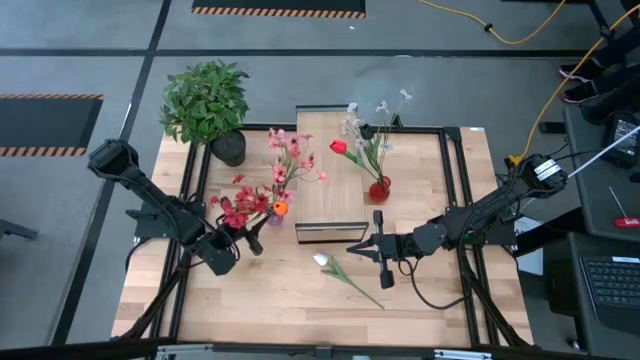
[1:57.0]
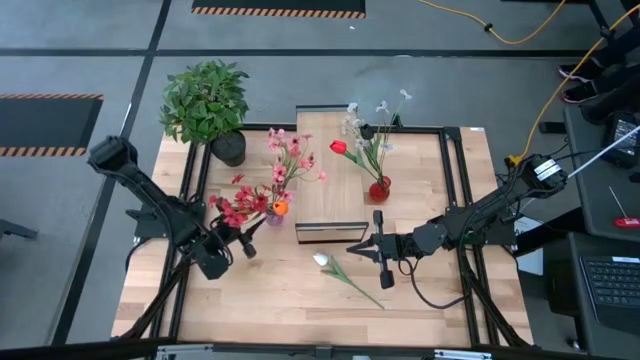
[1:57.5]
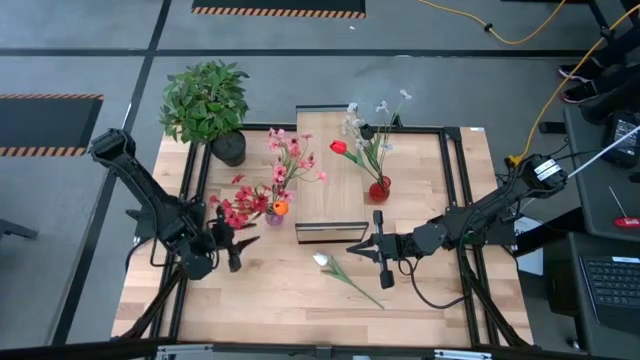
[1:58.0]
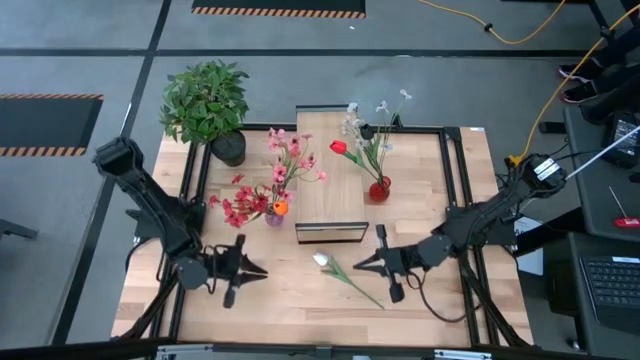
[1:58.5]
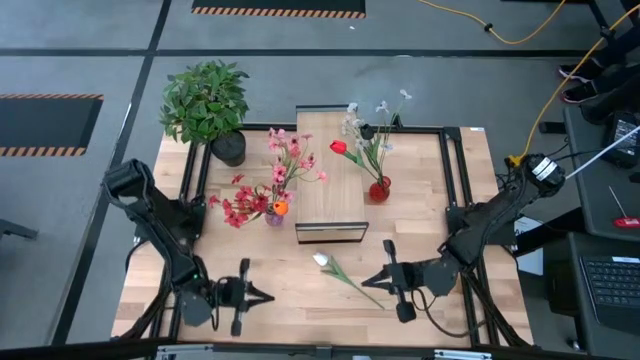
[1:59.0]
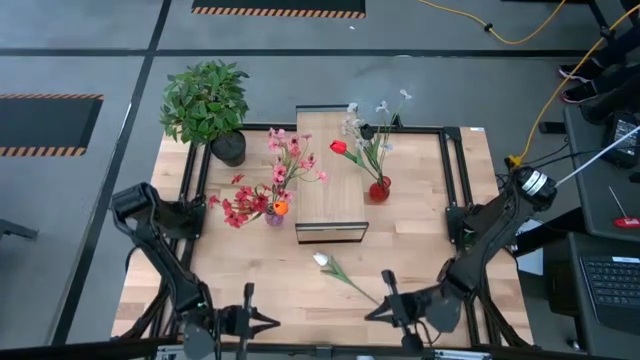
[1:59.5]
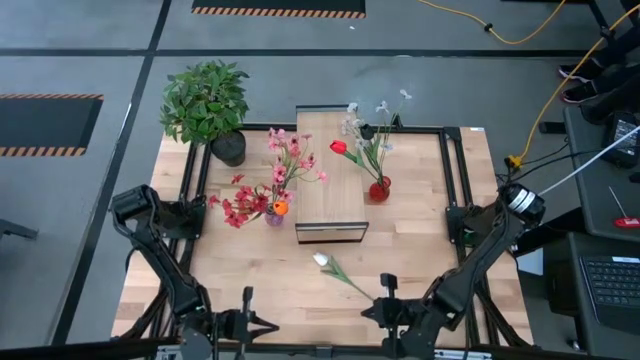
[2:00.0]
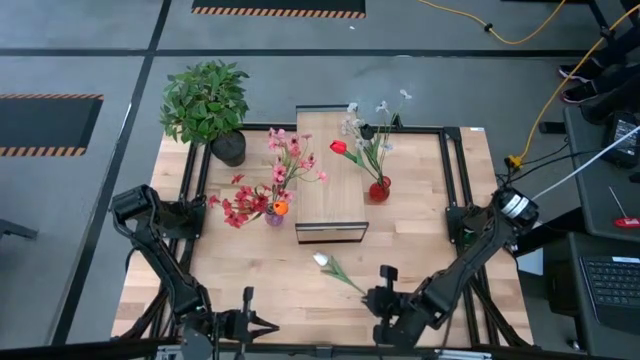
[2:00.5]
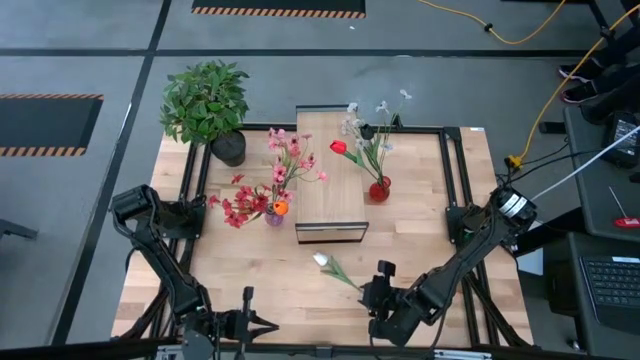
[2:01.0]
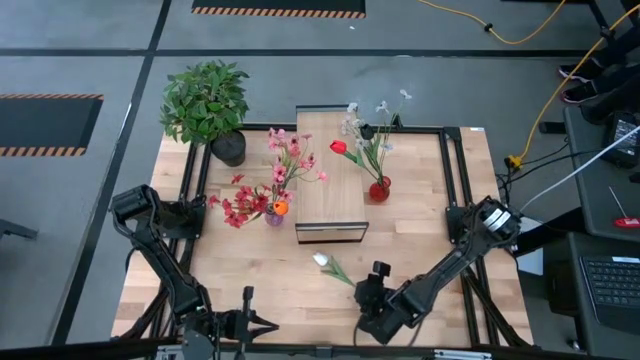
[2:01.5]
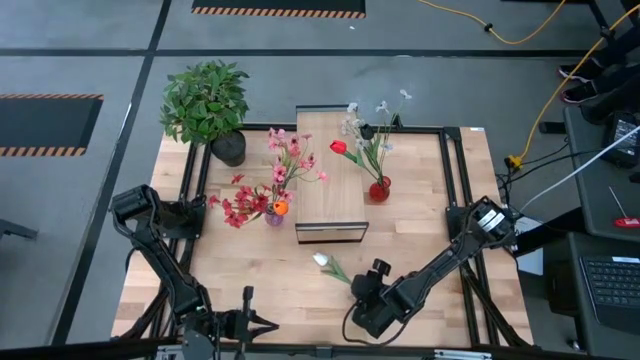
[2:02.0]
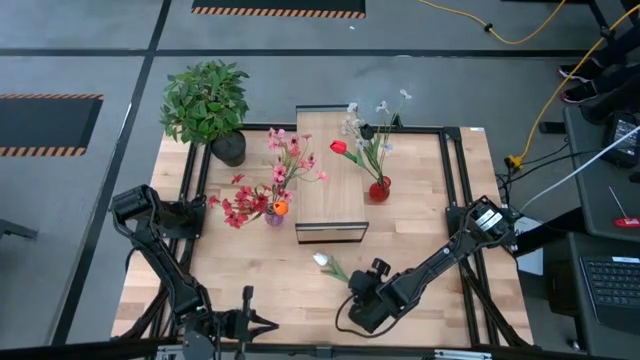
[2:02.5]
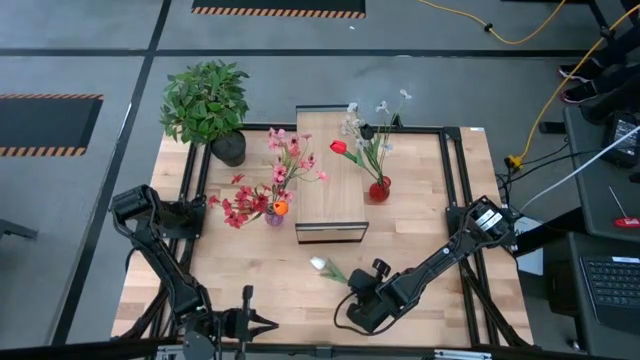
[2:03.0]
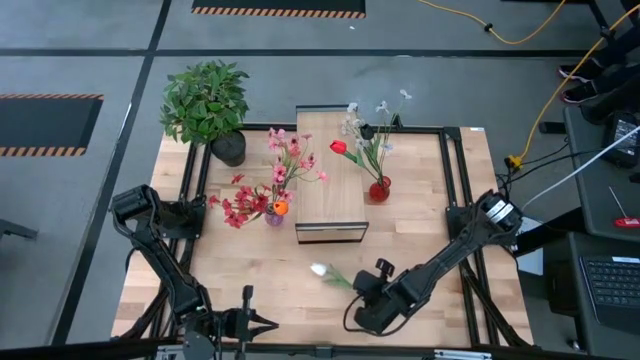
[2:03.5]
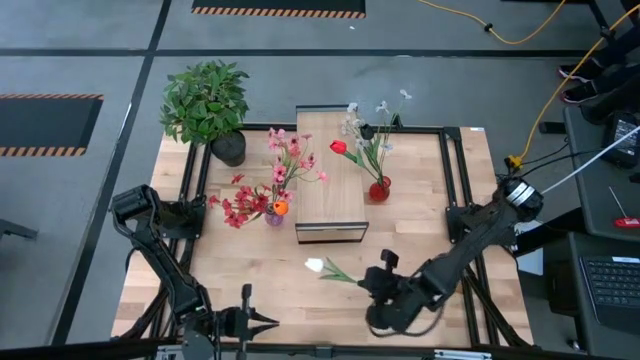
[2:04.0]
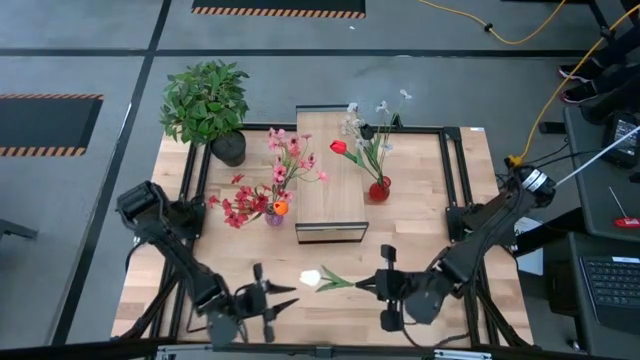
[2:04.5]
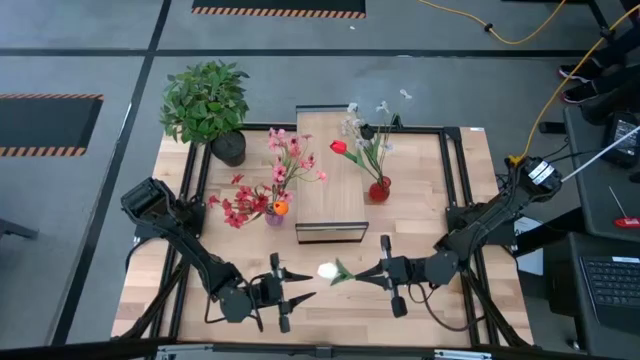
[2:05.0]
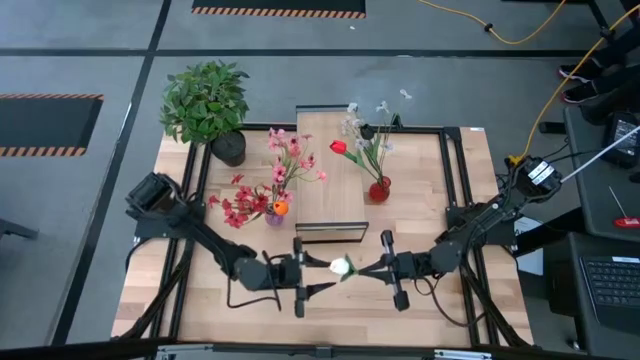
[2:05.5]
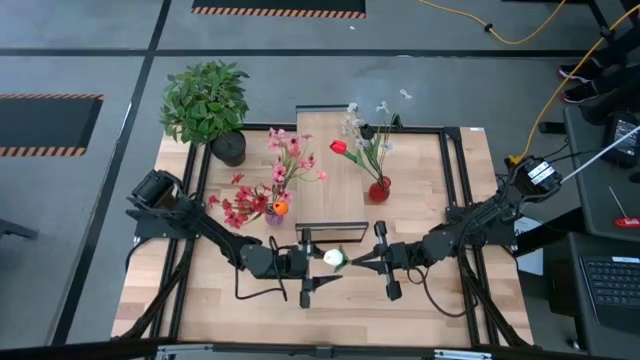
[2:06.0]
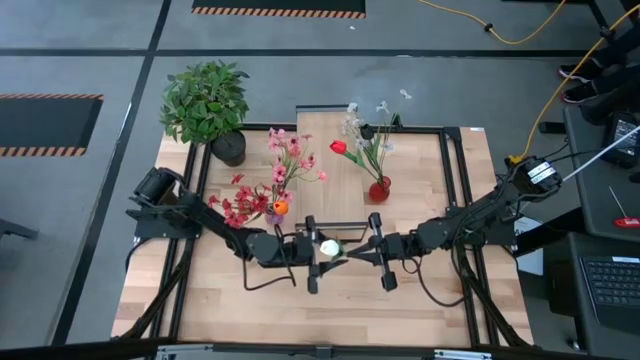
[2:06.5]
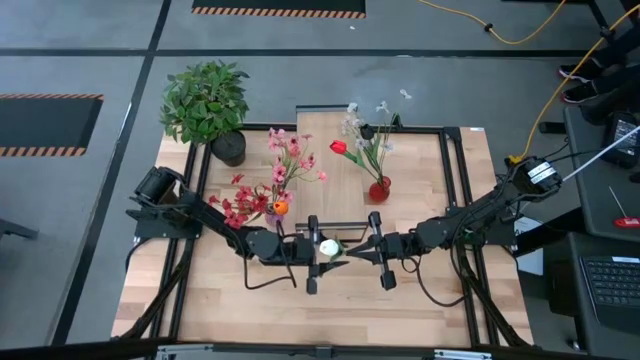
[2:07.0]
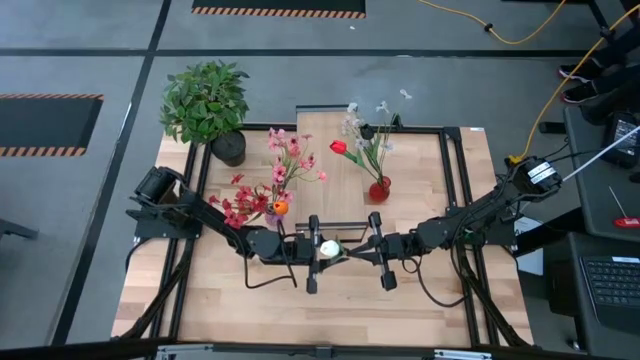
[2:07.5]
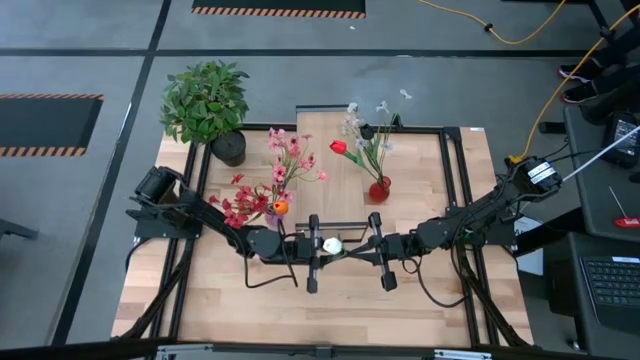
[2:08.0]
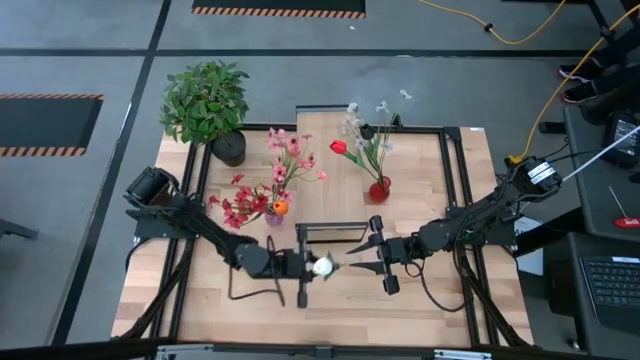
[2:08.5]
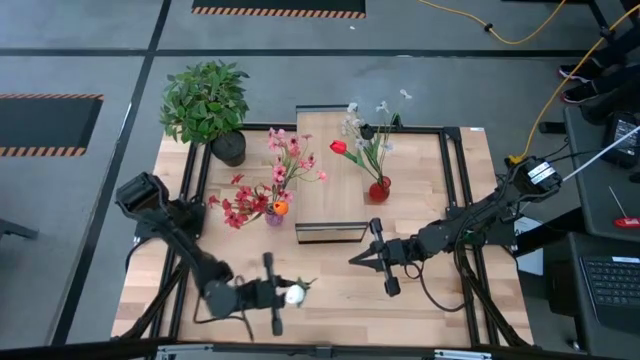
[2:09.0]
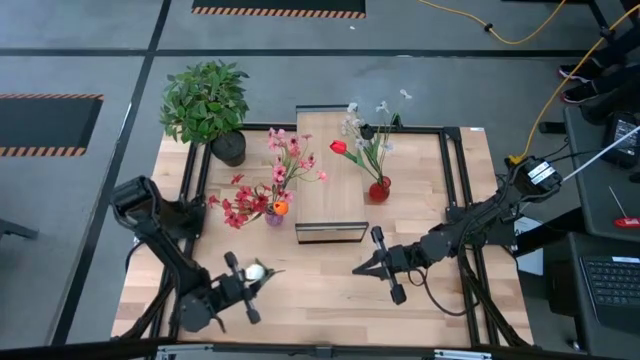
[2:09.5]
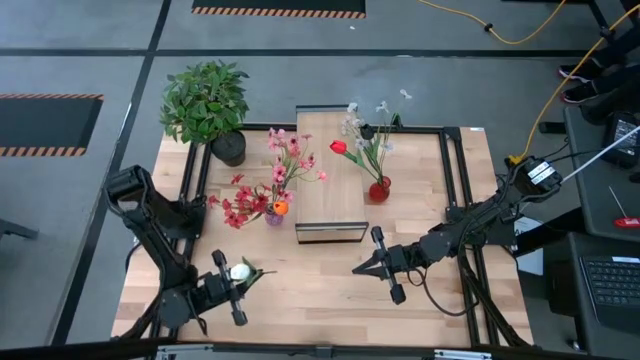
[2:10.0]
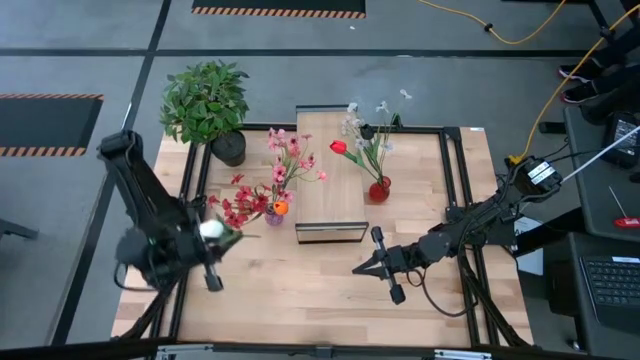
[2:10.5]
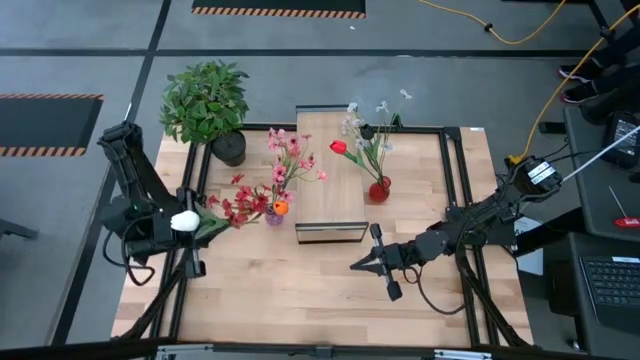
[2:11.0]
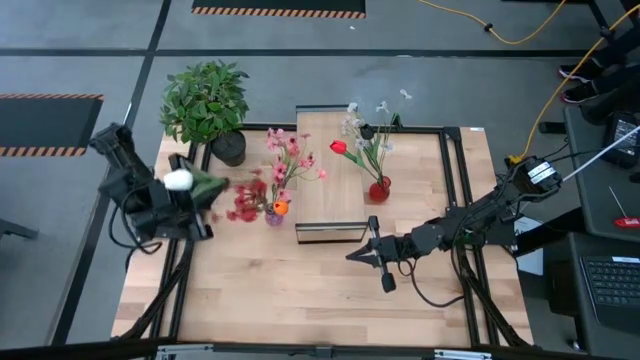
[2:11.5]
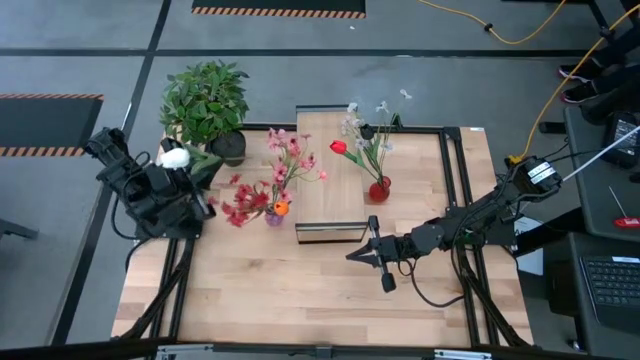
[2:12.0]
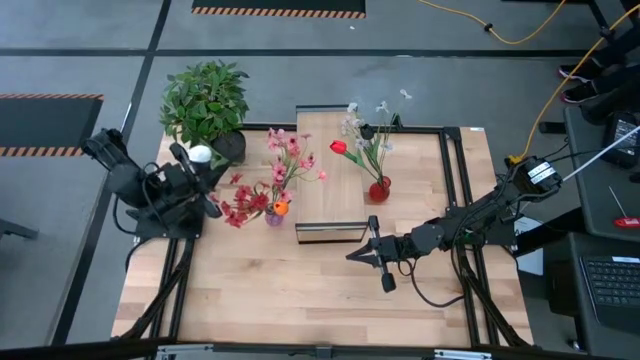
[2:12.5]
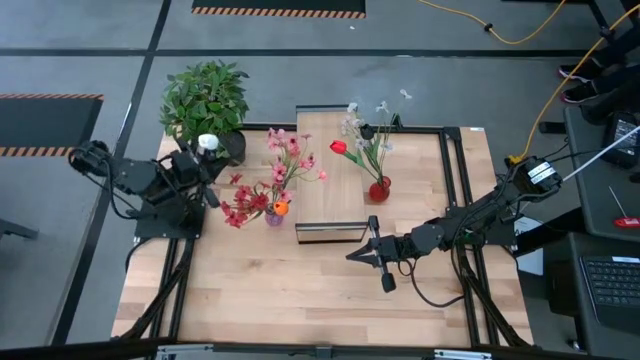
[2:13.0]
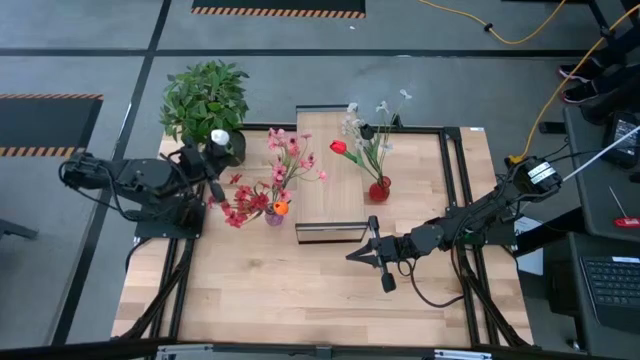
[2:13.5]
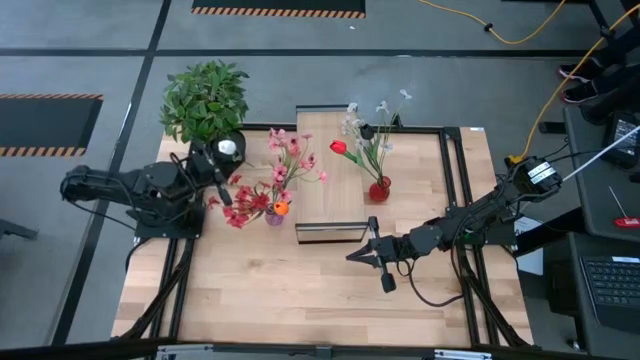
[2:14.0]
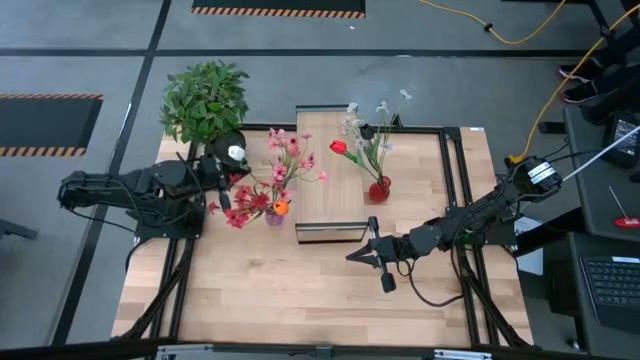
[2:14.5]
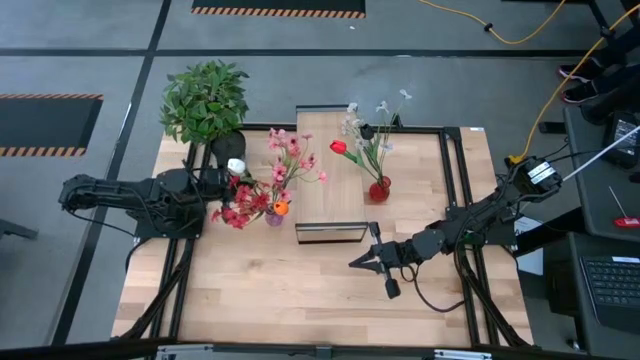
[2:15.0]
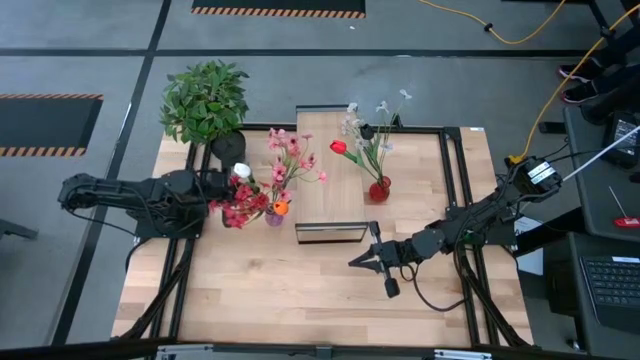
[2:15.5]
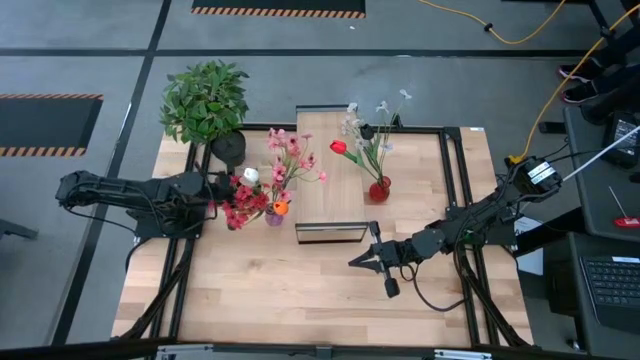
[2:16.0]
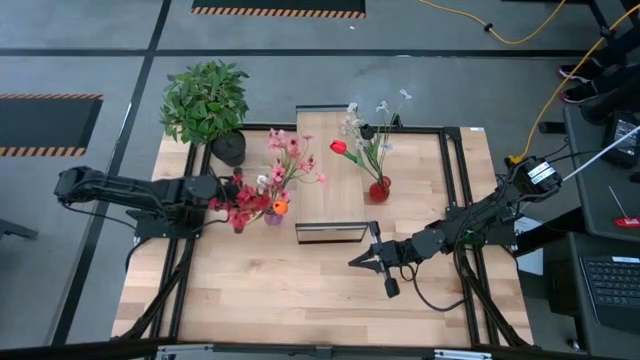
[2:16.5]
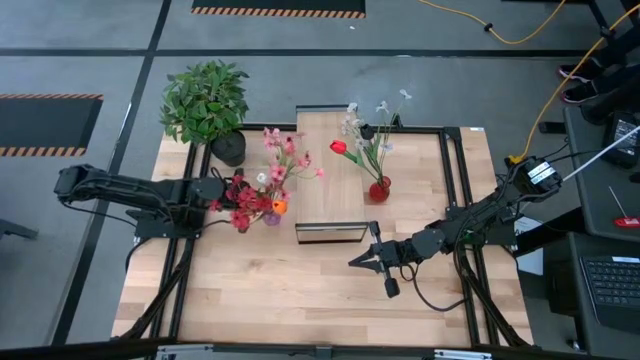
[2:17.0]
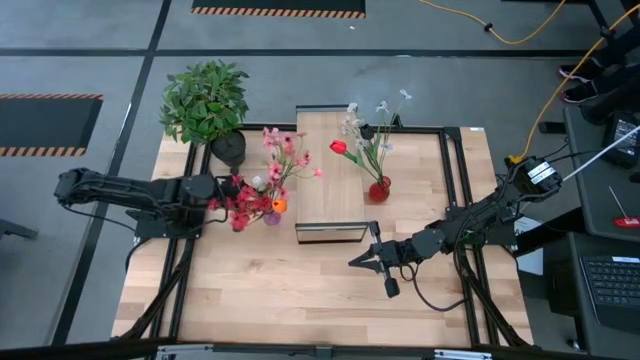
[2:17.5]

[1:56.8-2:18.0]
Task: Pick and place flowers into a vace then onto a shelf
Put the white tulip into the violet vase
